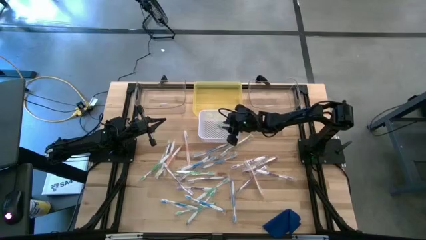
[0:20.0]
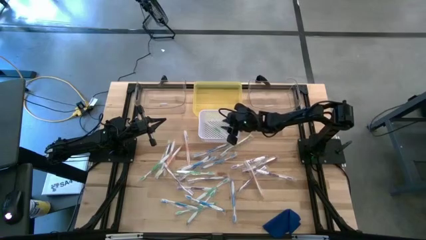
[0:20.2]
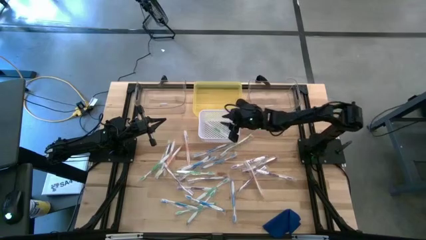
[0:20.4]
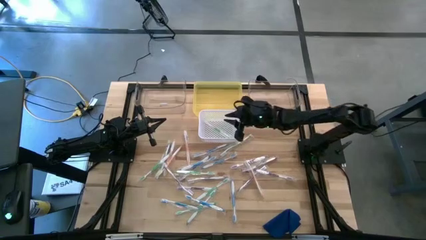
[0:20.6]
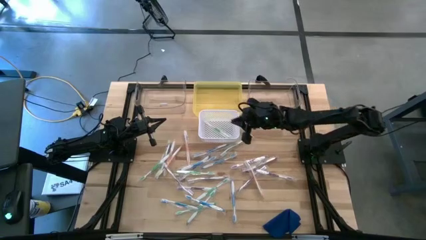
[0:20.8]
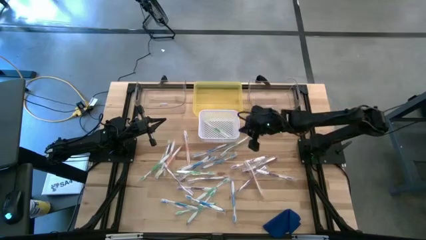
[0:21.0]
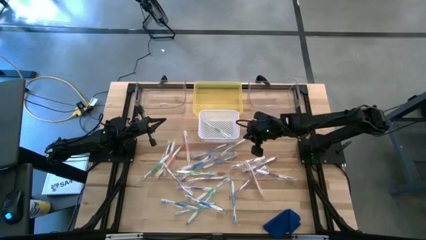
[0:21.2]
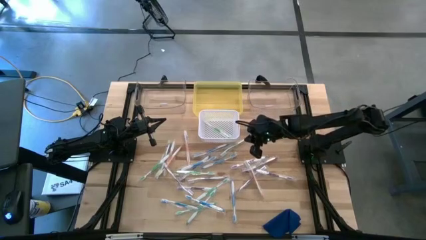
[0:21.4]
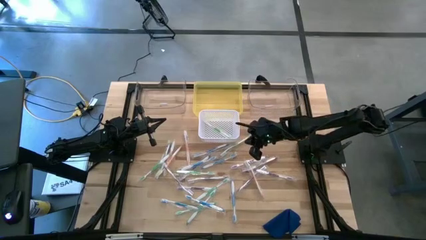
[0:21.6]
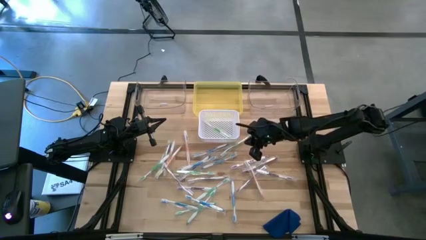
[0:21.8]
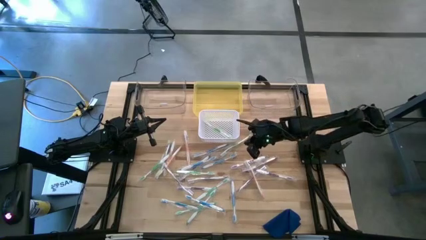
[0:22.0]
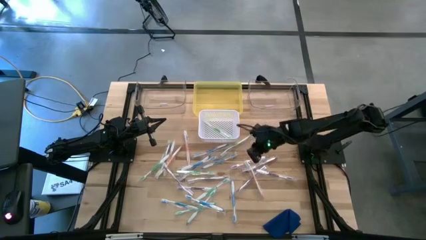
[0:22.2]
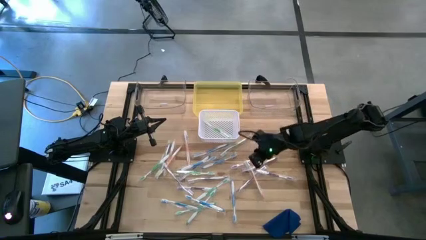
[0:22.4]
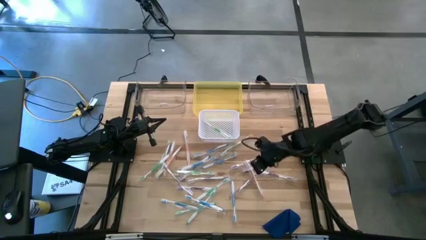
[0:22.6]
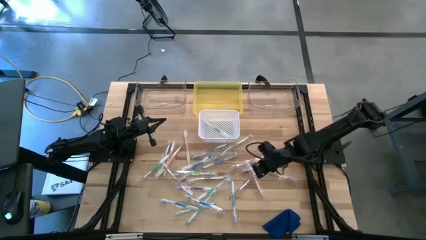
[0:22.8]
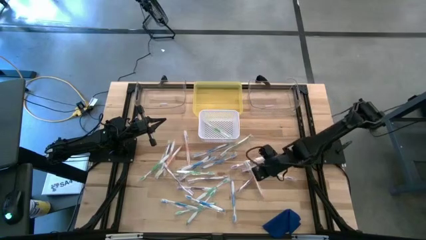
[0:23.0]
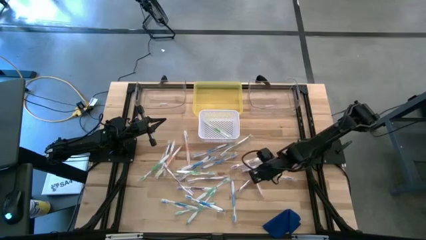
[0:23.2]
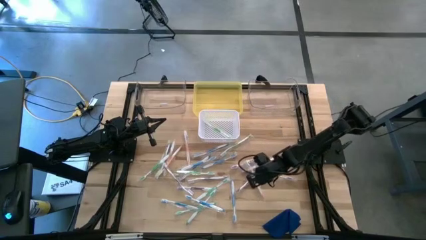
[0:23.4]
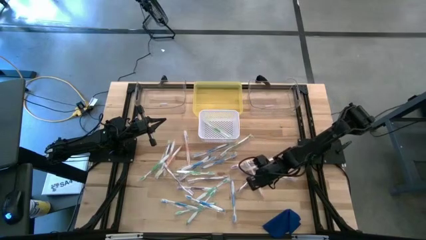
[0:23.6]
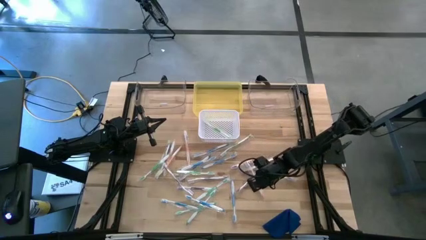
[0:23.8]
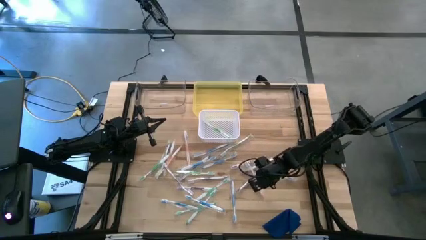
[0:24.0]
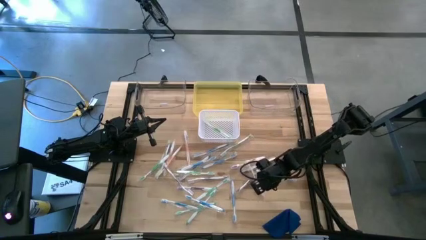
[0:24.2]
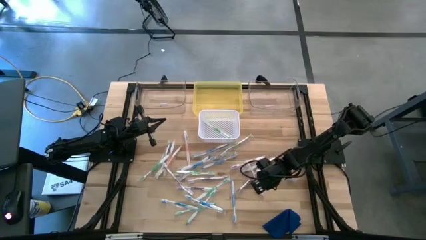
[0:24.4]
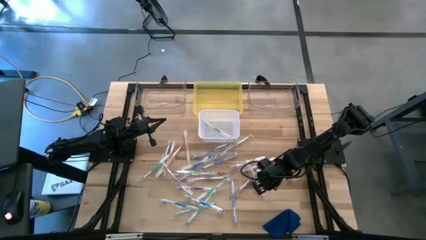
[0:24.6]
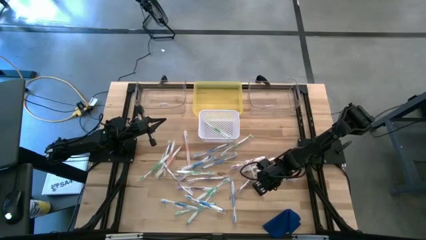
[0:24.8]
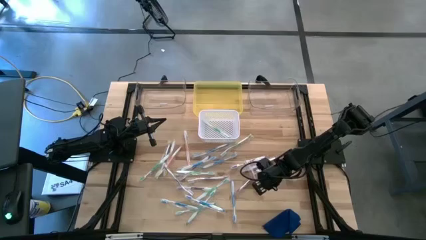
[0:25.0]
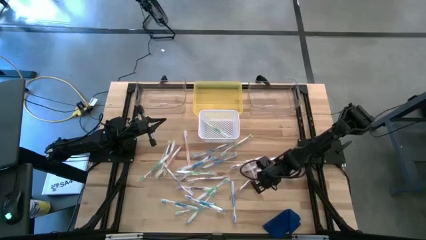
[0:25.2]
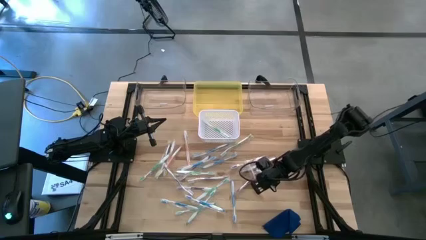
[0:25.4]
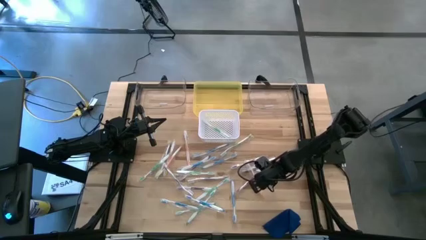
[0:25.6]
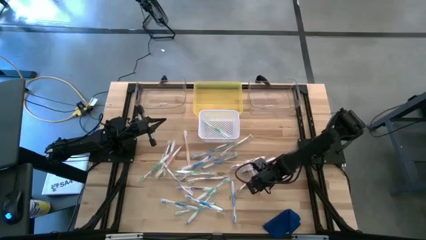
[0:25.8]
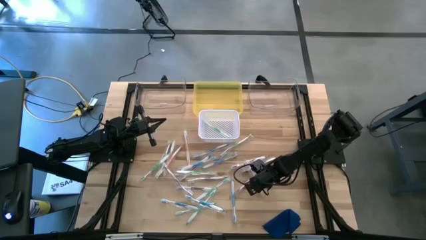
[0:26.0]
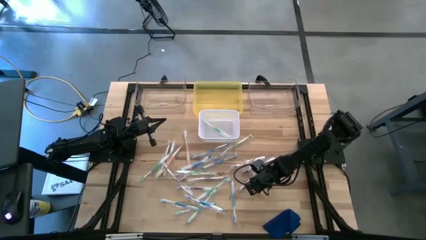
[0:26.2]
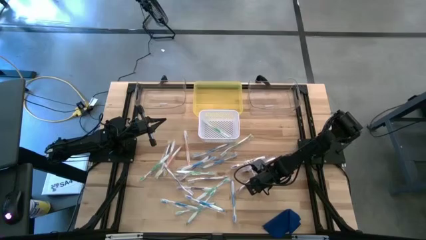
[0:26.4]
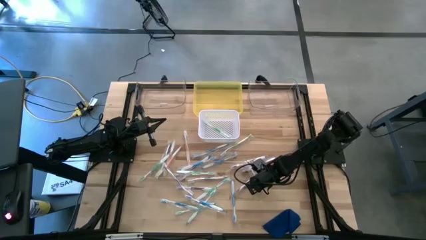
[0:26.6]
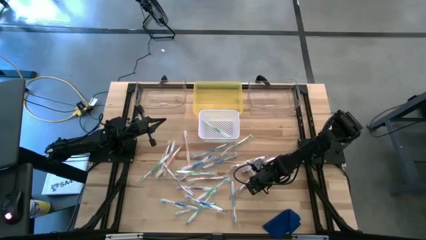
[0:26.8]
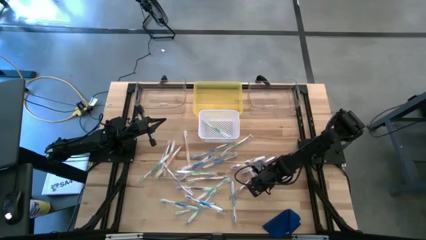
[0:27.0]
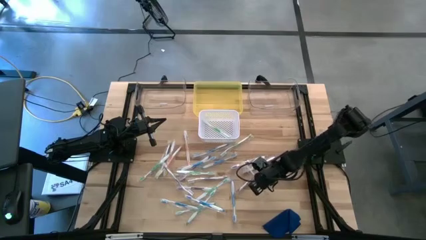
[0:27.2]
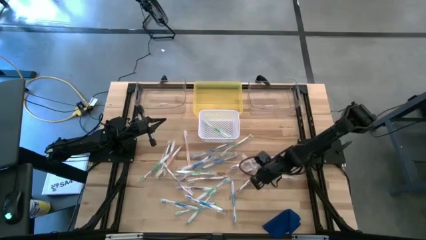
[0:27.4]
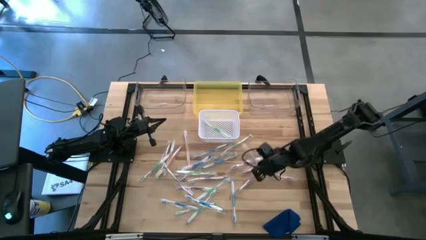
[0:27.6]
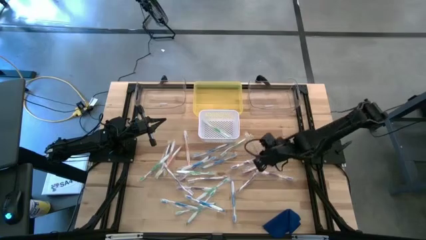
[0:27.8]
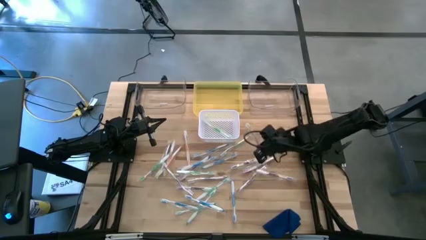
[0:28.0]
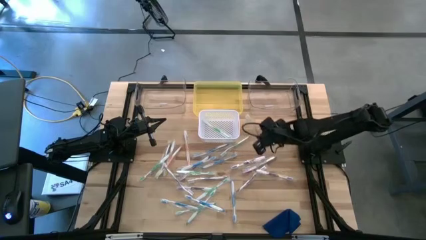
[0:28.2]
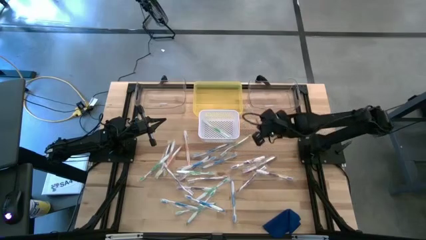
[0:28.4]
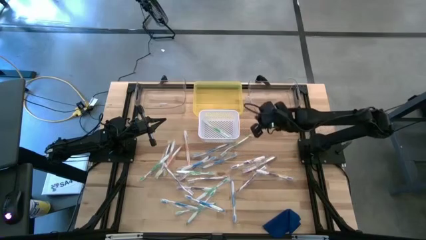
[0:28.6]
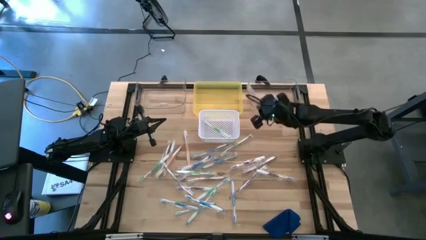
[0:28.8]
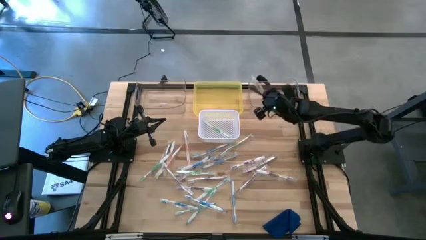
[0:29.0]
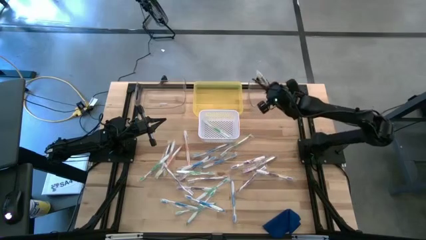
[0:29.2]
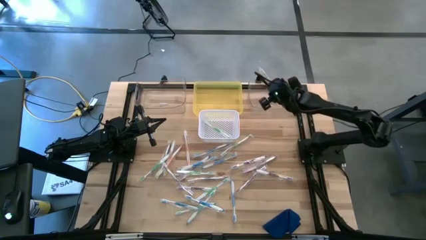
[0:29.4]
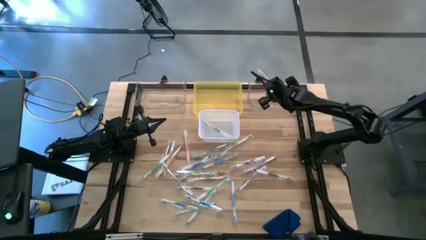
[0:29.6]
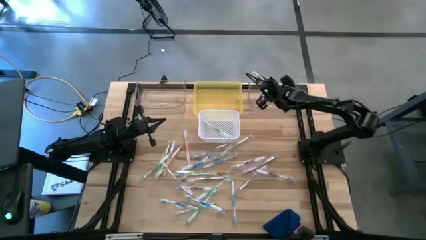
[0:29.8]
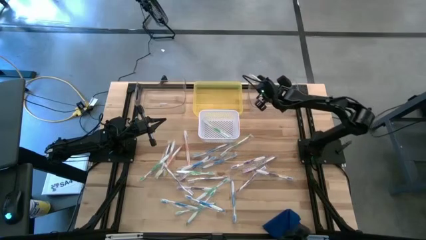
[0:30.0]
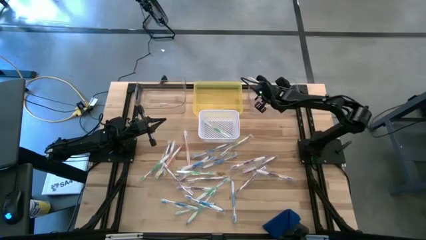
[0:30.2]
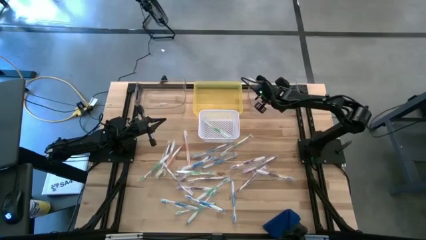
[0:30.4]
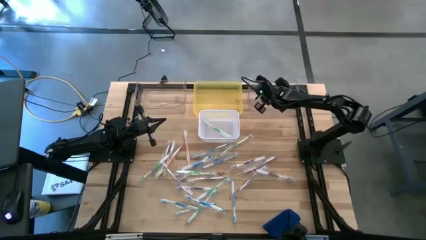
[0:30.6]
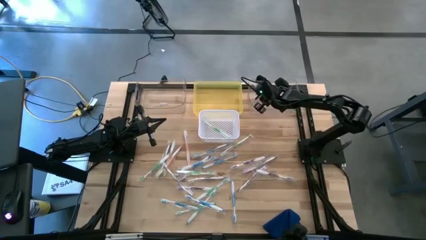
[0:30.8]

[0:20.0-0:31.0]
Task: Pick & Place Toothbrushes
Put the orange toothbrush into the right transparent bin
